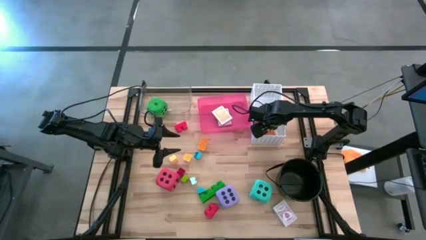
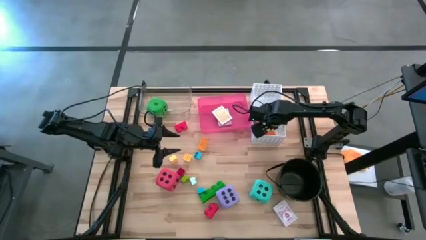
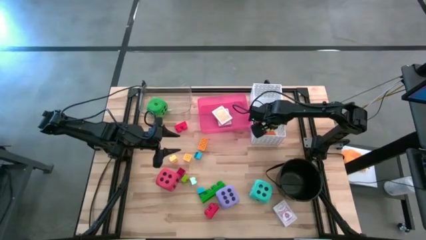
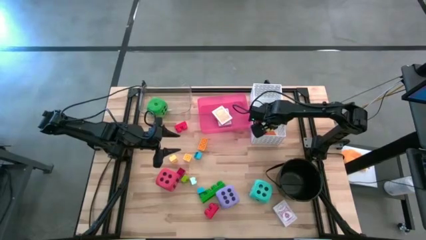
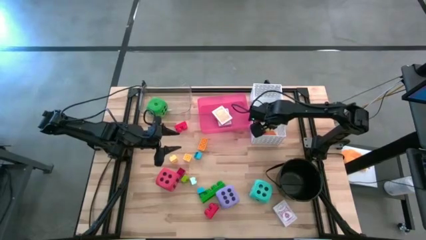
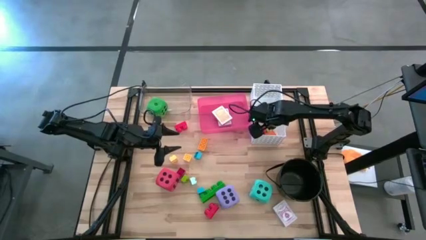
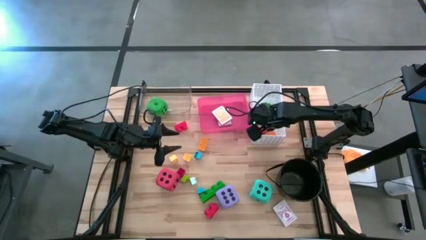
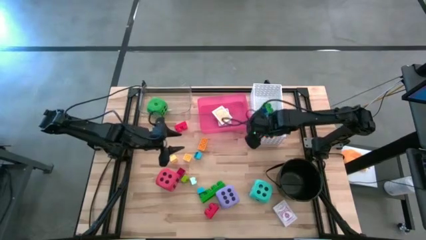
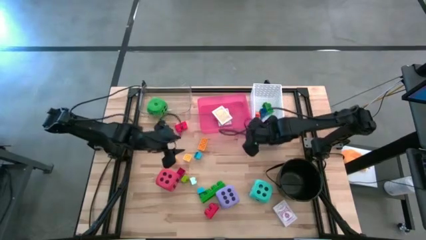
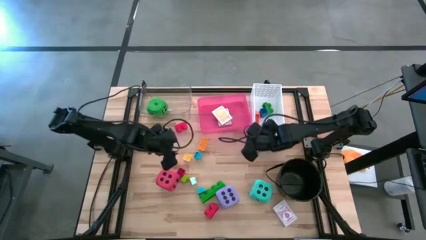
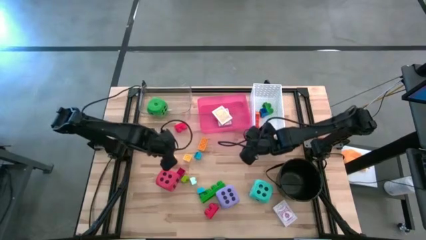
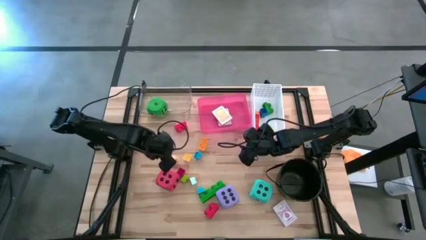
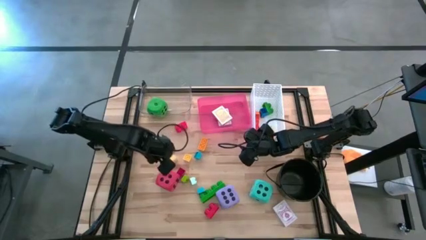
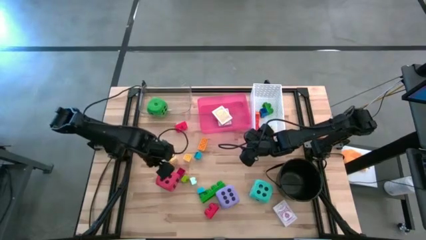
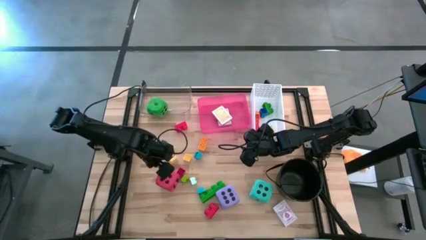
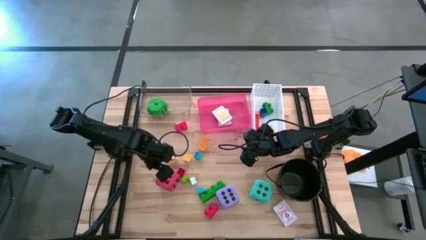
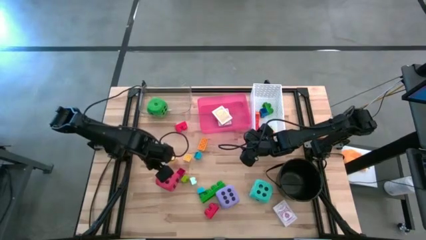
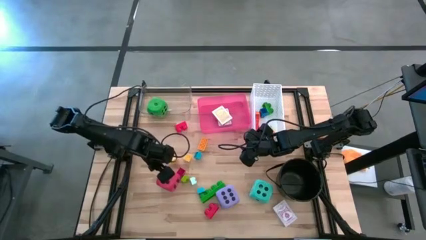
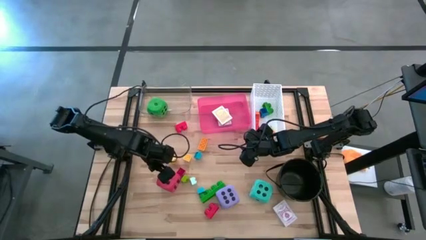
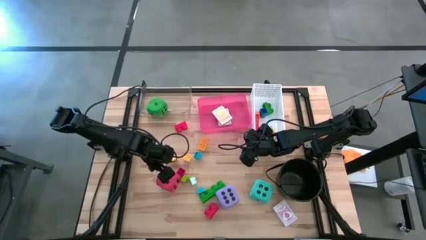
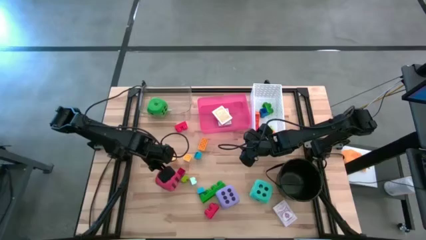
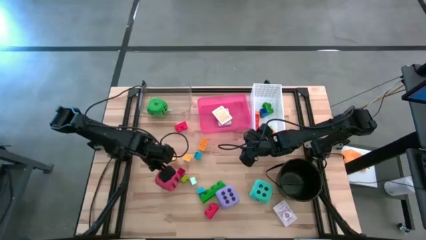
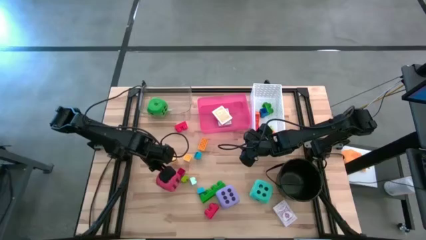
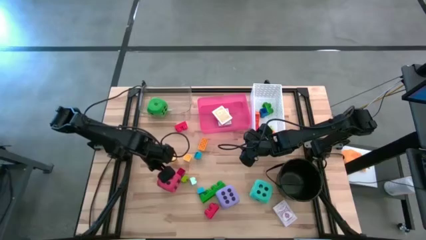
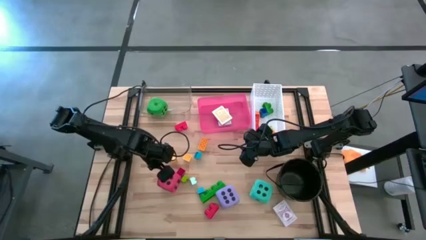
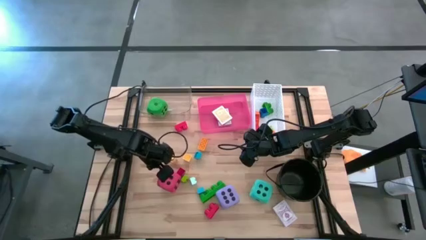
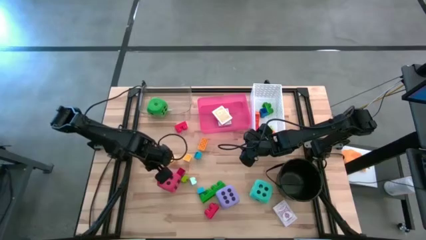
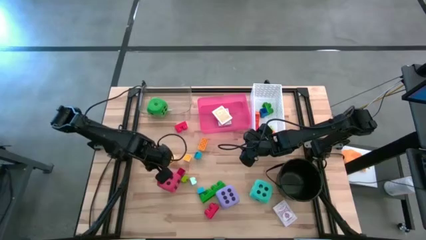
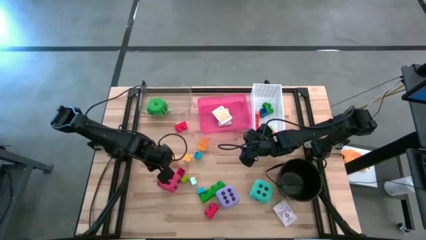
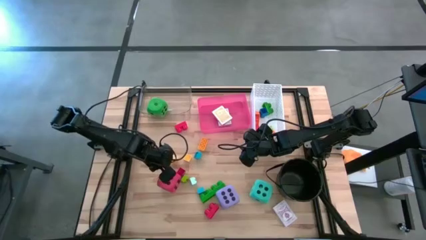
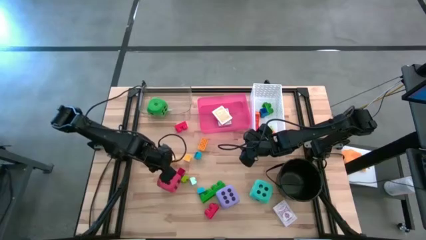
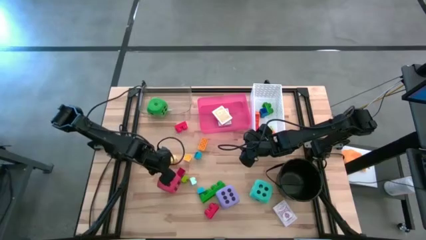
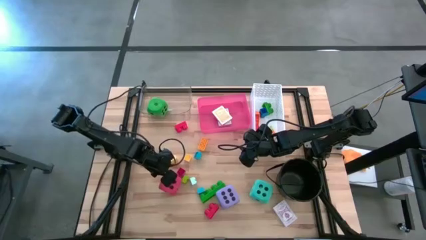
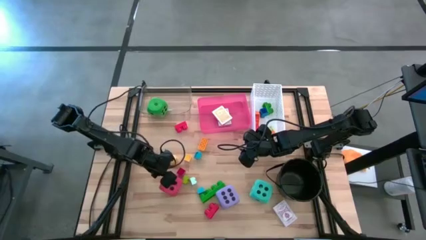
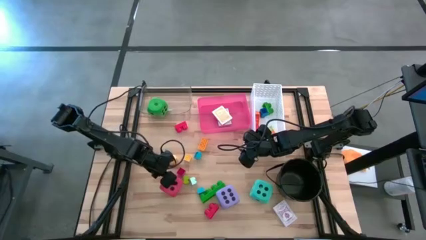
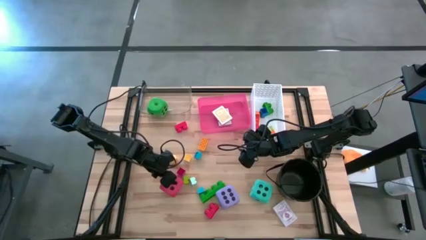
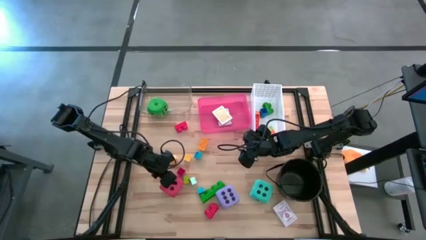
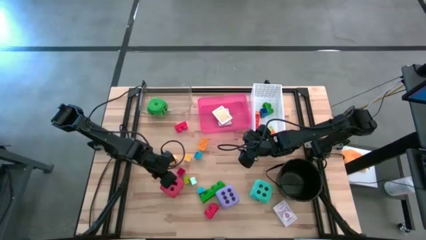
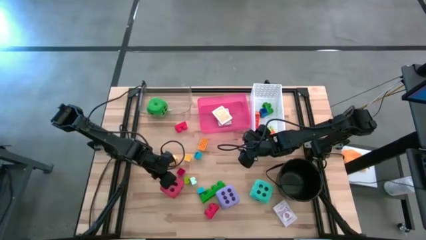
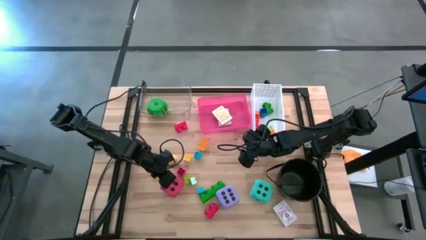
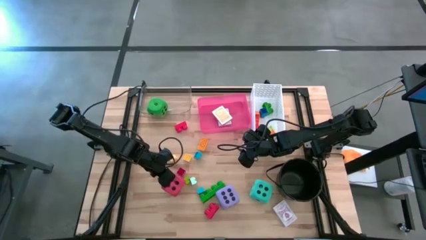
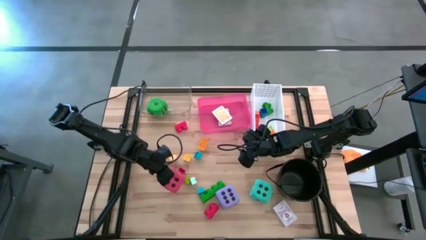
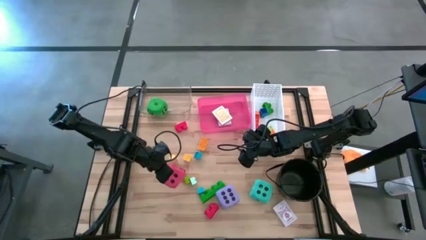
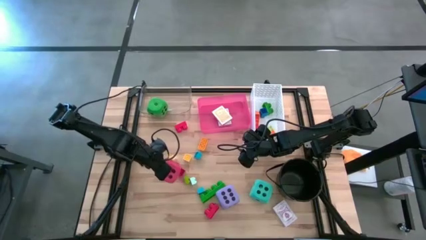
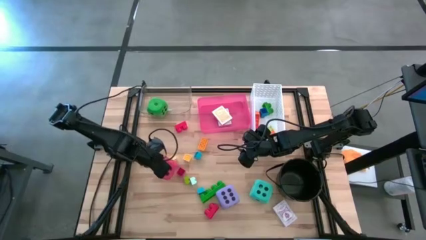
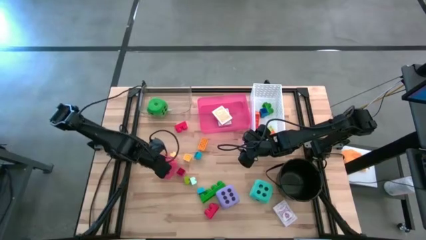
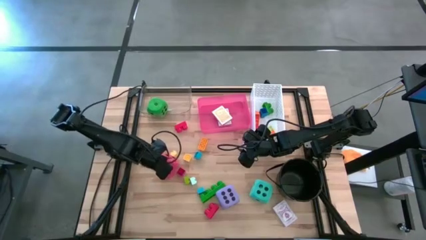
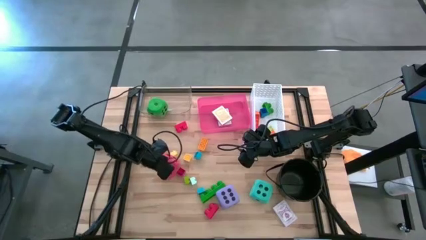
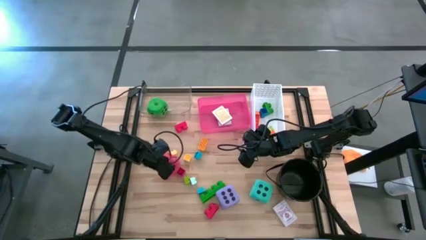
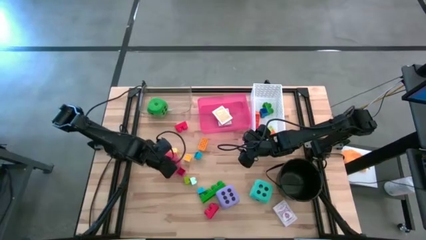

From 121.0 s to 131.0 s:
Task: Pick & Place Toys
Put the red die into the transparent bin

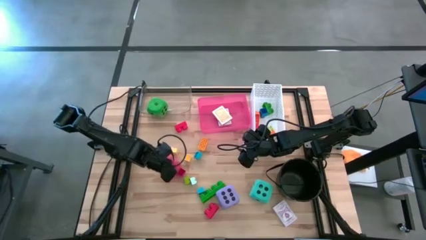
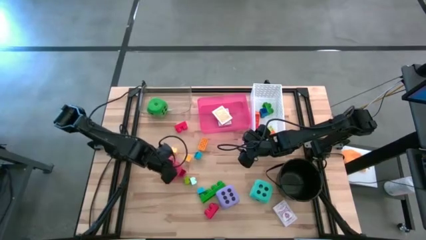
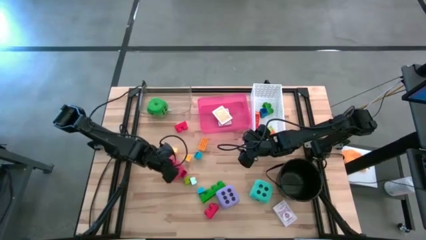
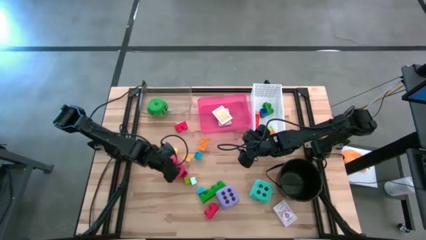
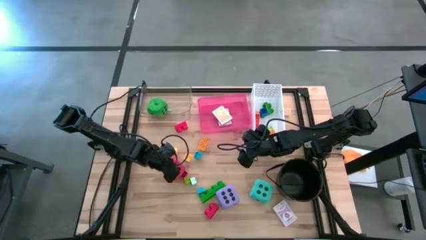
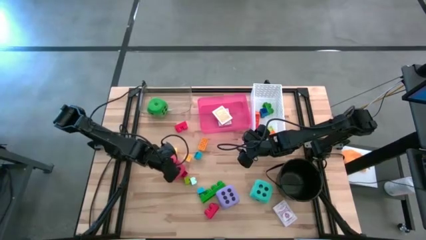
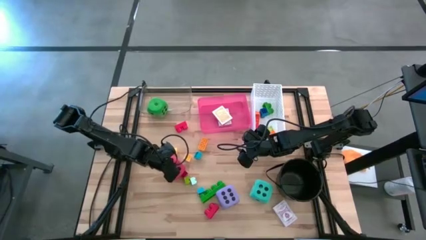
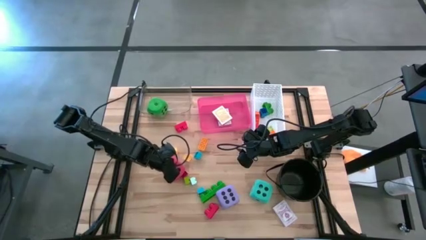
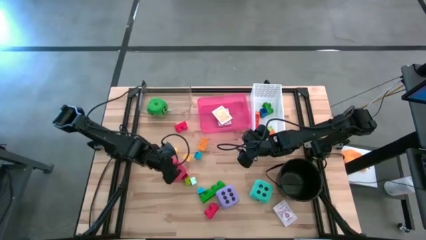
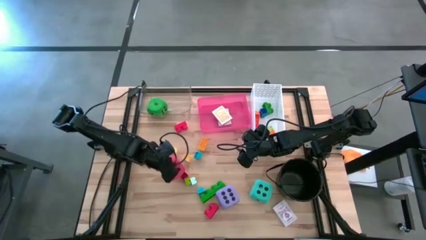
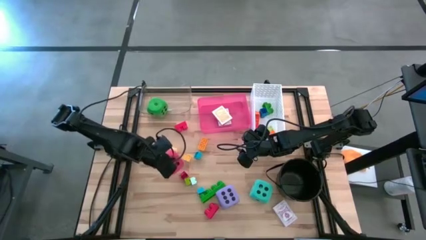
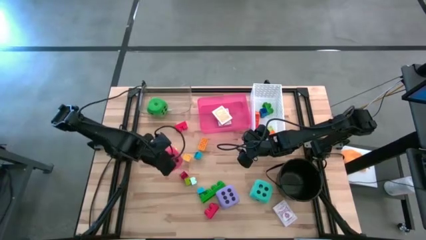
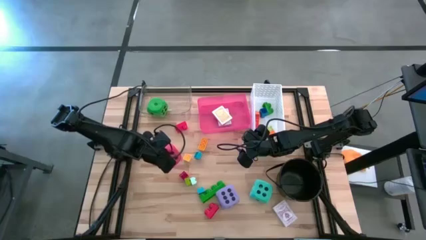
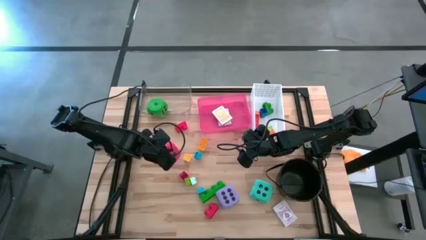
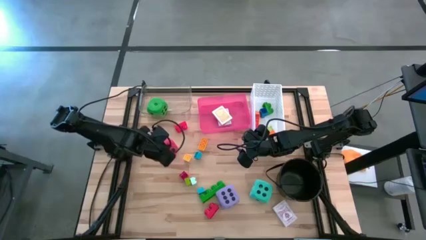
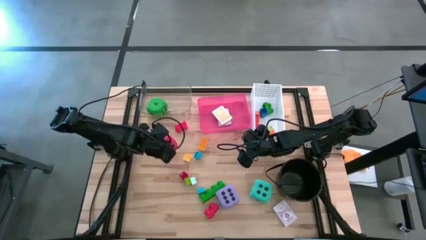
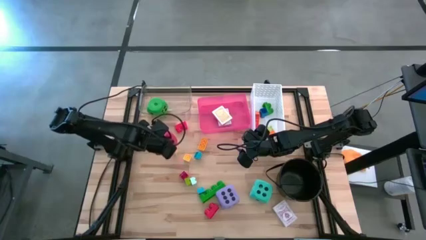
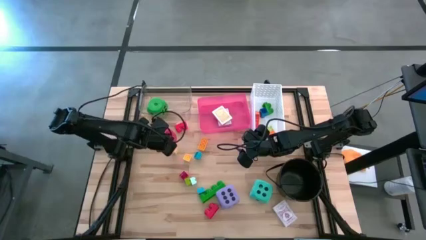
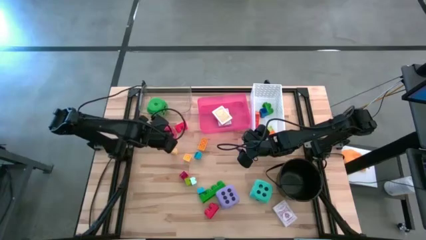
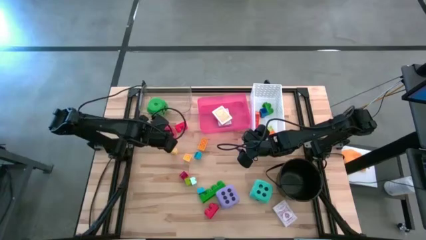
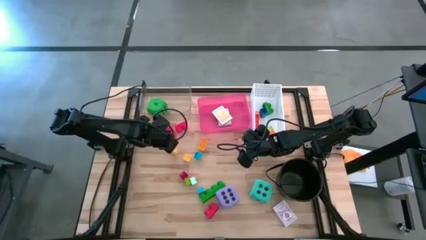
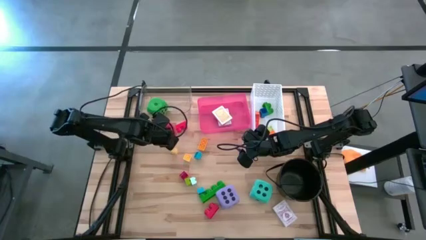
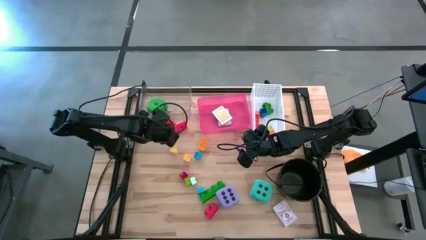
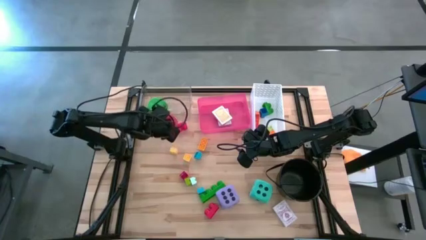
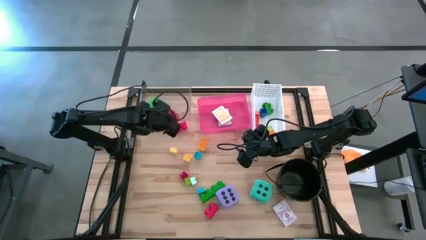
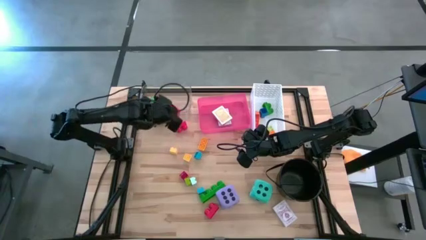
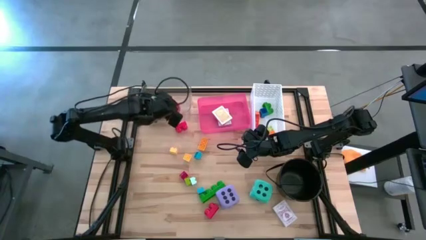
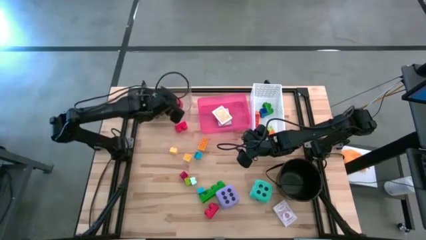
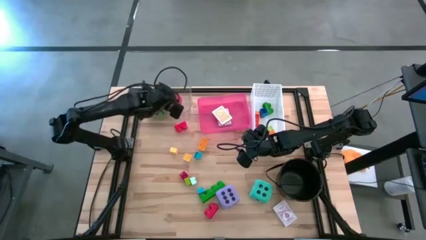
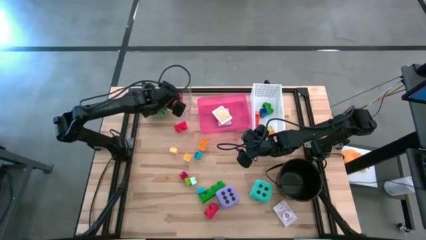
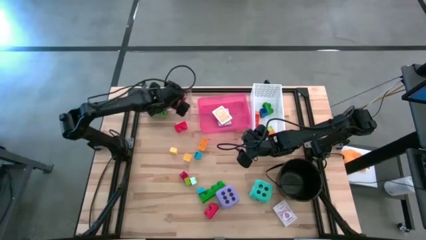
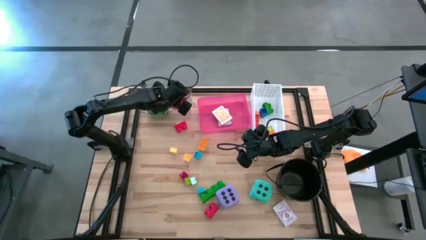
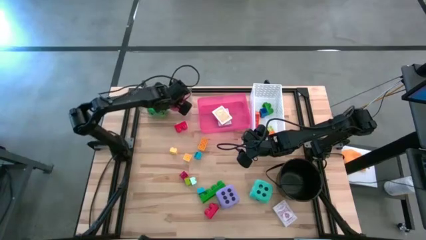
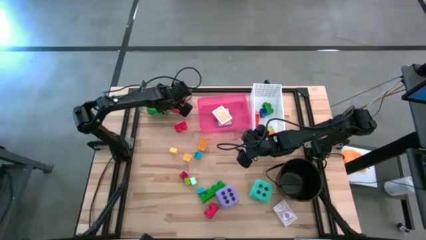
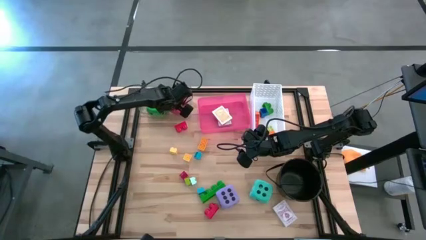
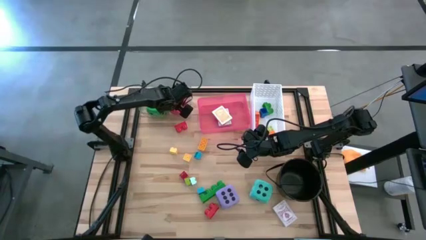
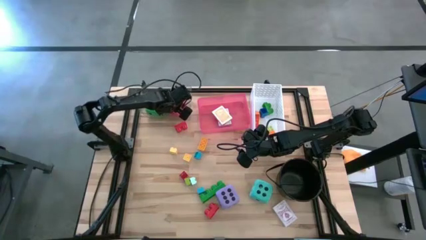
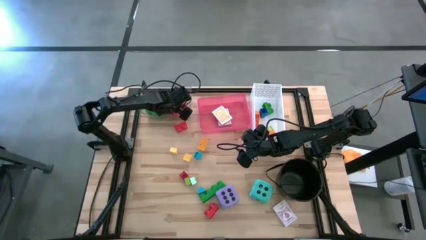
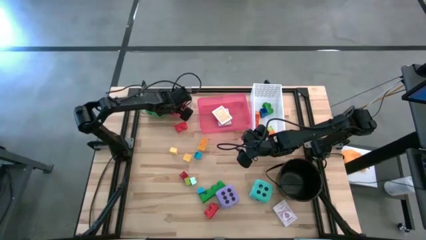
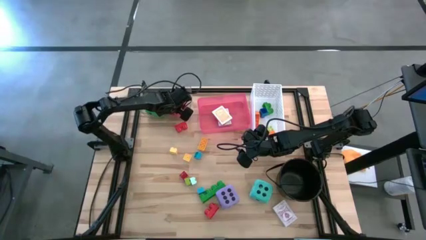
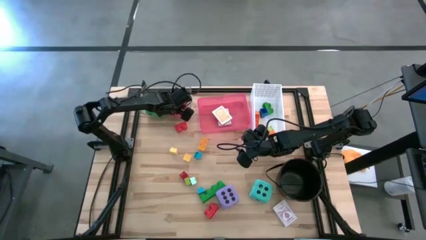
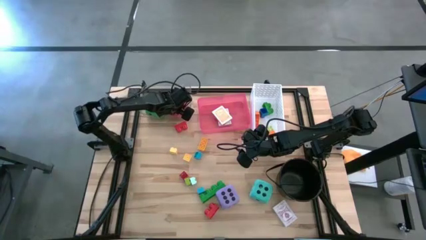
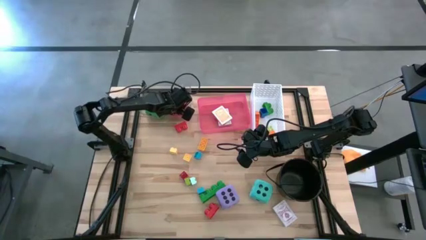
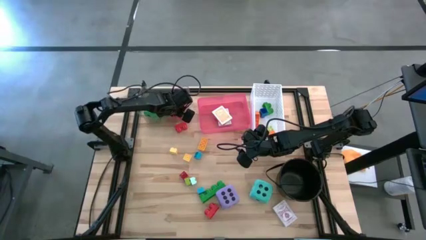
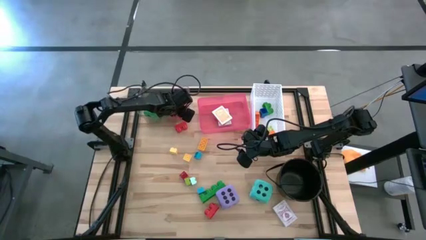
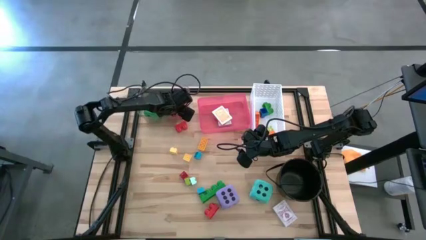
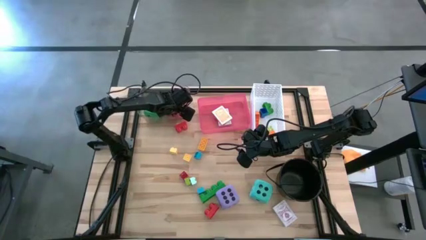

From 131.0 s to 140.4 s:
Put the red die into the transparent bin
